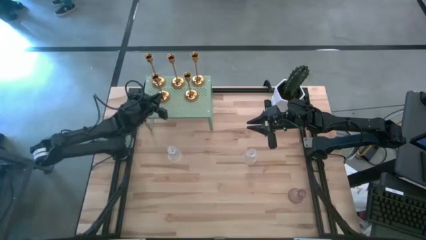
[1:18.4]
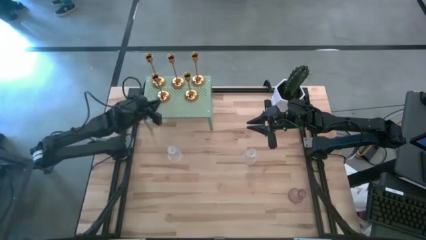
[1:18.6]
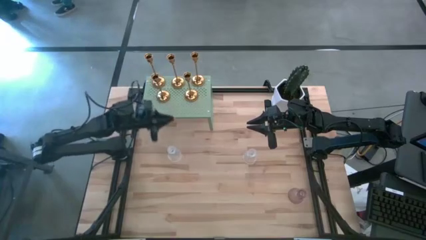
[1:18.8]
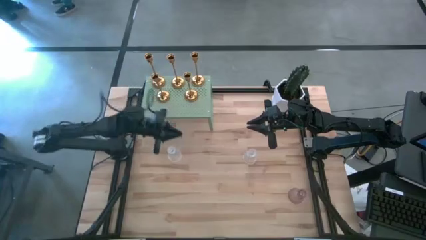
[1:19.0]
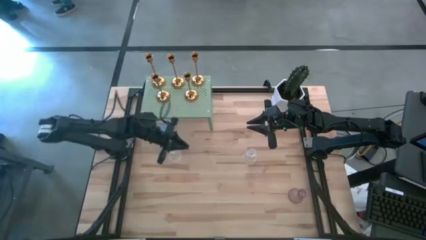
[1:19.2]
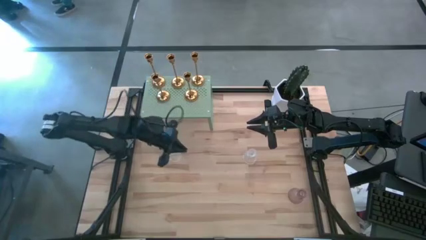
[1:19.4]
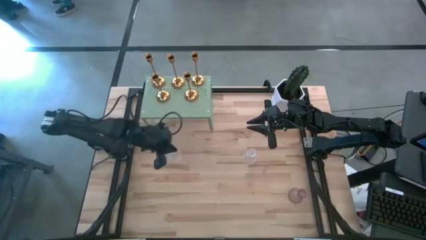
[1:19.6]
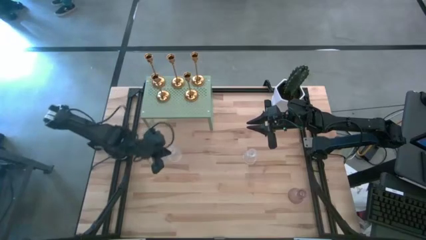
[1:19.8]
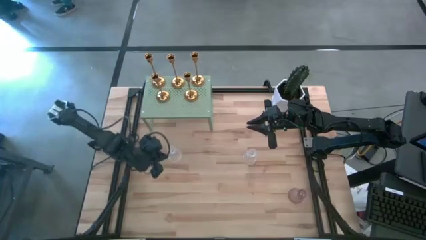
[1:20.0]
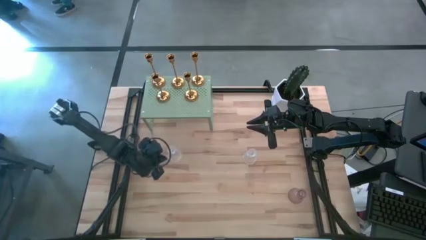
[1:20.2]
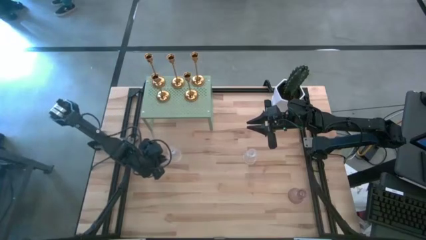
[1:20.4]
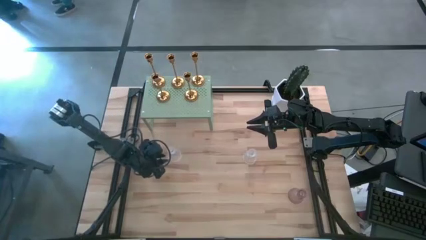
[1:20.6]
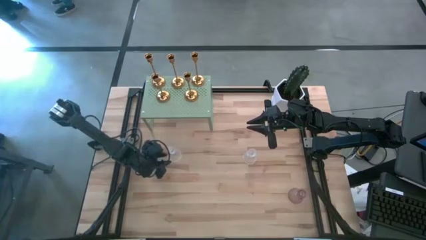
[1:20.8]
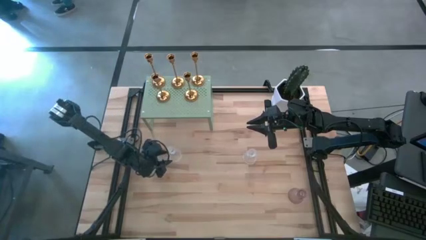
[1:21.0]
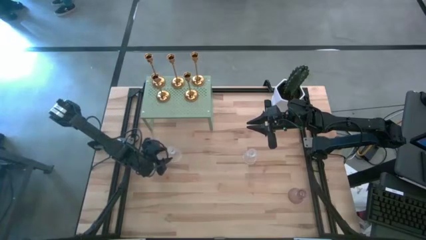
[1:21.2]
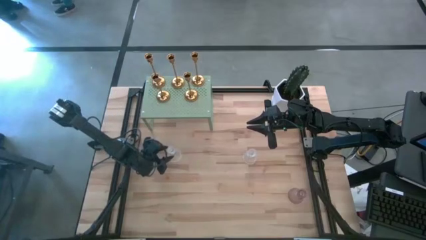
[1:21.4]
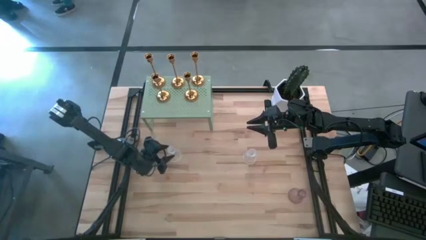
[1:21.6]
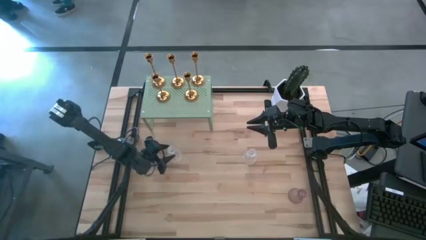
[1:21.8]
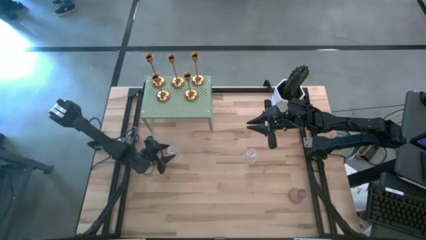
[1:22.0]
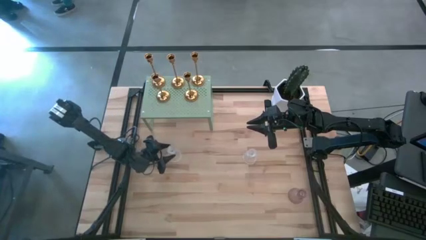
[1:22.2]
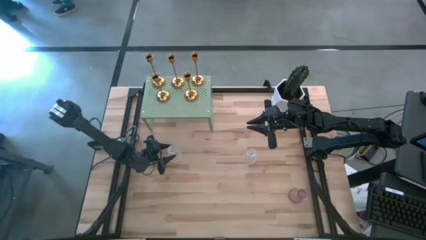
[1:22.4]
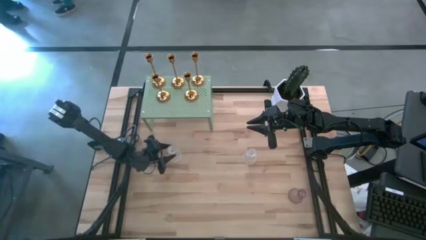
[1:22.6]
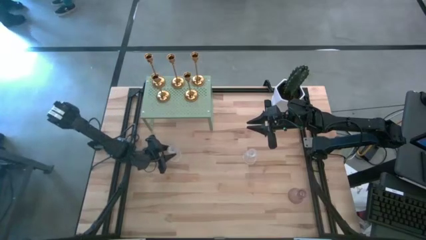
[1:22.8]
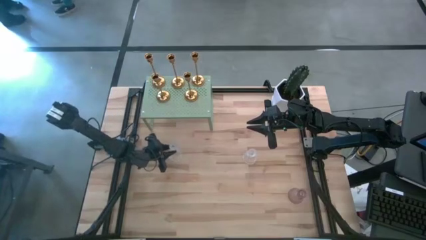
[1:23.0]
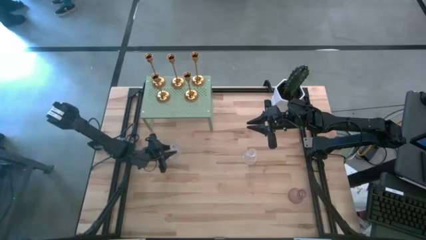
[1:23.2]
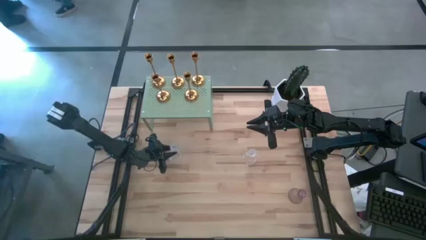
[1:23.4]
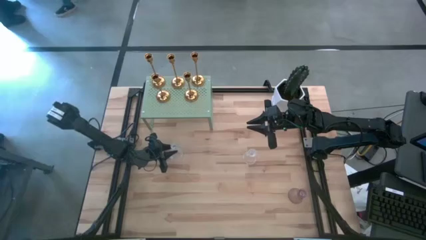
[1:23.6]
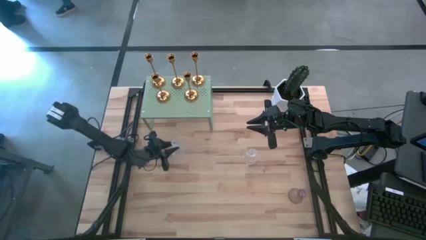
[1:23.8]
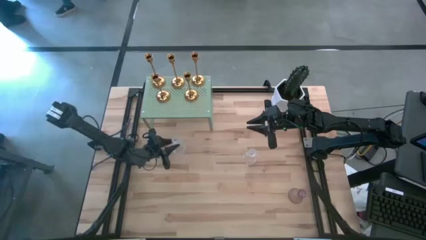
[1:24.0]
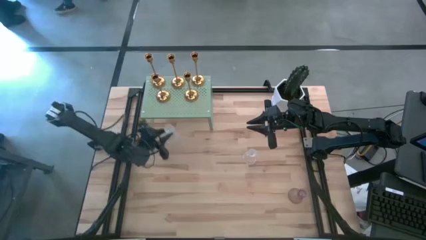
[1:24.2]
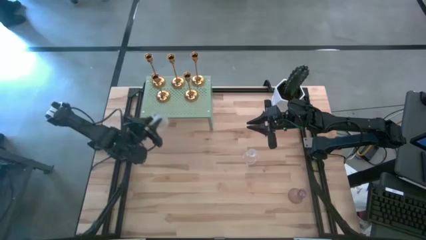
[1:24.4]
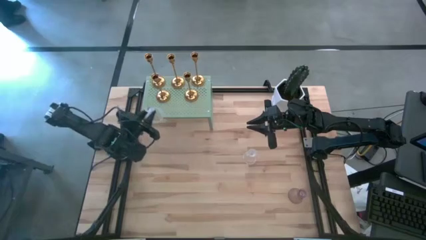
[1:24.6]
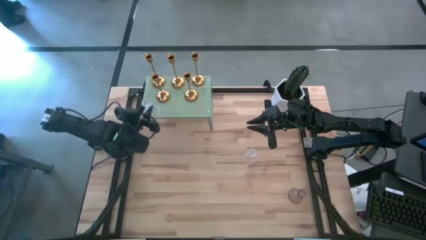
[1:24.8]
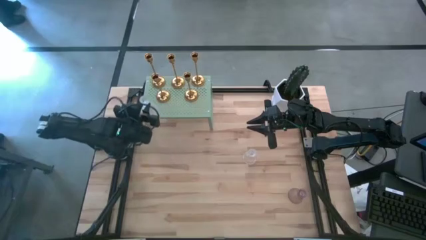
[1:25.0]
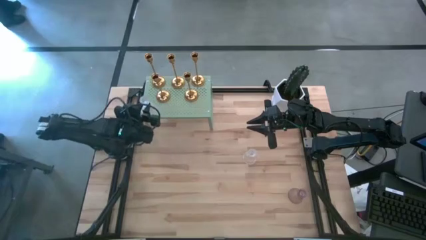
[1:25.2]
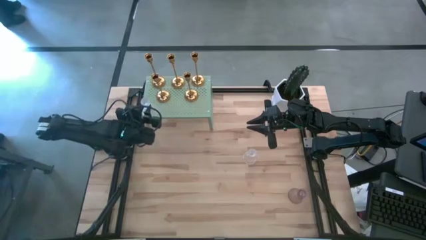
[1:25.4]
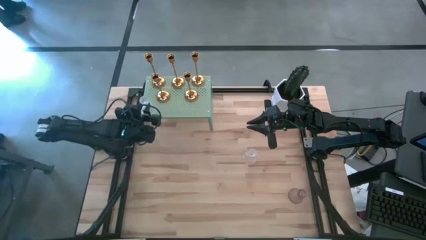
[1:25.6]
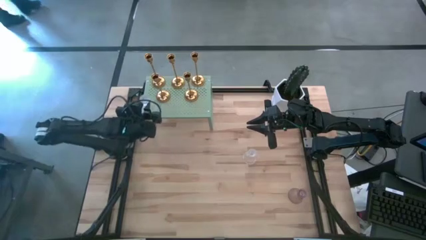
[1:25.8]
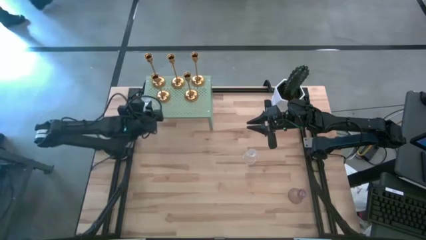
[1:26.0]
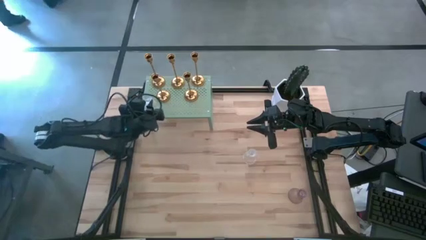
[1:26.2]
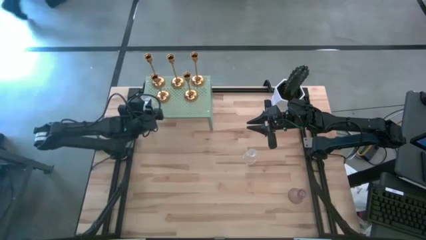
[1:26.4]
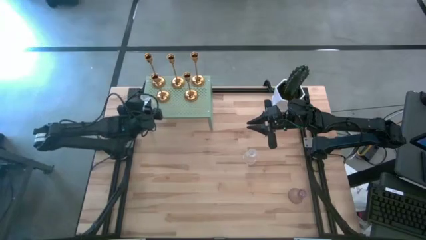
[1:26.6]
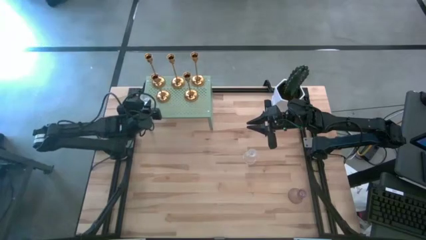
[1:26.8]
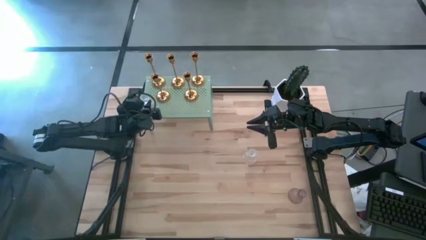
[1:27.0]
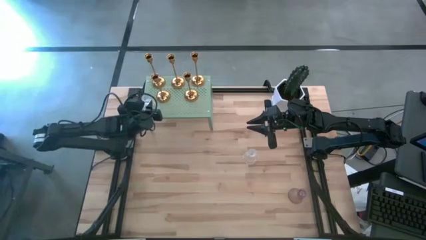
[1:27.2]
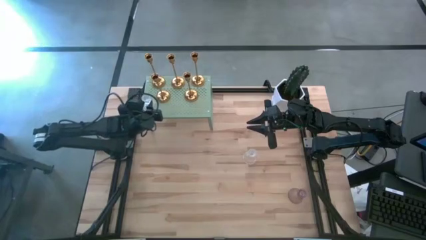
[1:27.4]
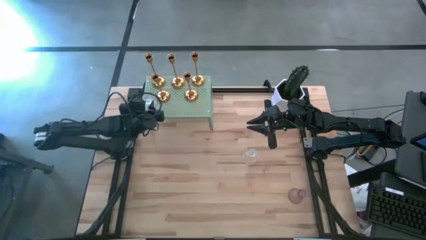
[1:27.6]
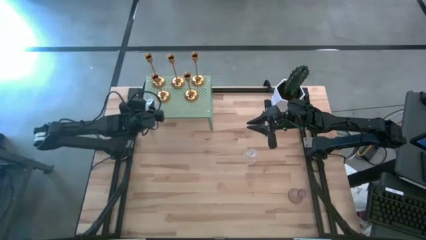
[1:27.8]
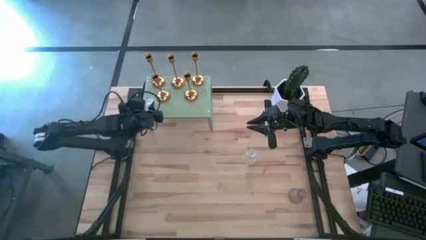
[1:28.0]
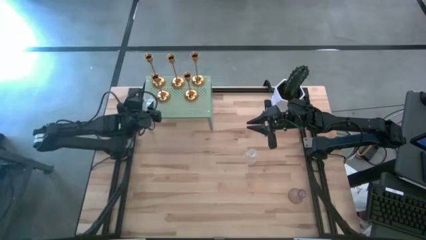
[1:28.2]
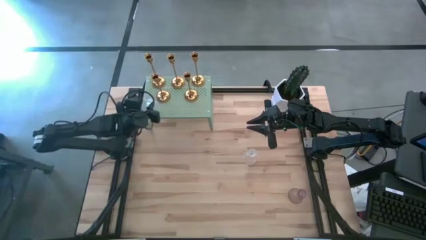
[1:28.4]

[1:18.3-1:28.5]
Task: Pick & Place candle stick holders
Put the left transparent glass candle holder on the shelf

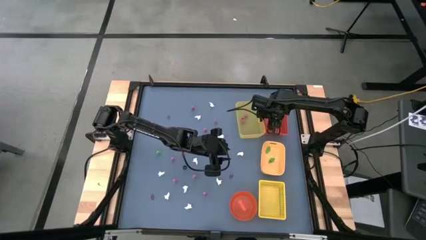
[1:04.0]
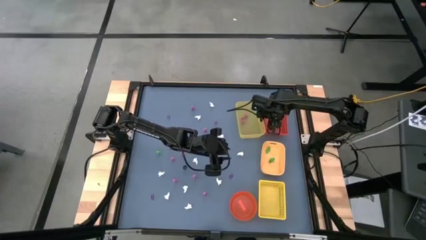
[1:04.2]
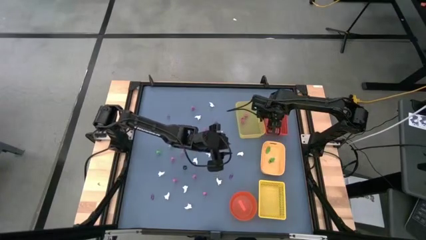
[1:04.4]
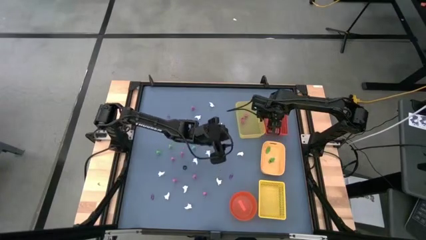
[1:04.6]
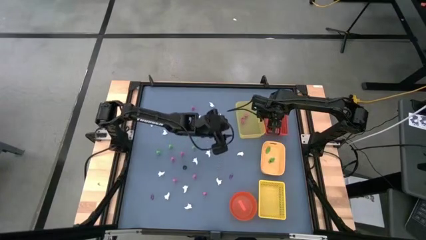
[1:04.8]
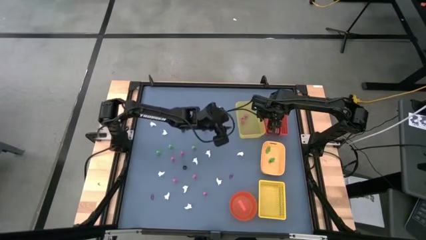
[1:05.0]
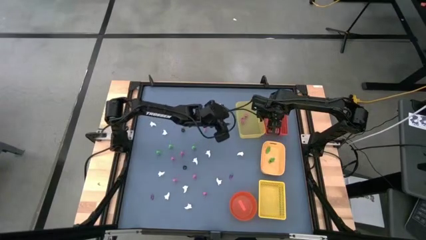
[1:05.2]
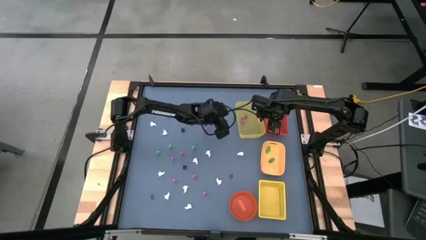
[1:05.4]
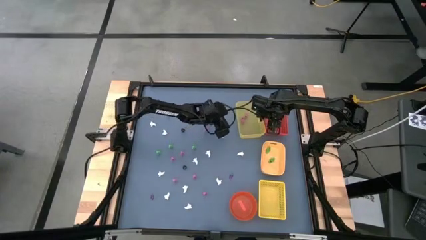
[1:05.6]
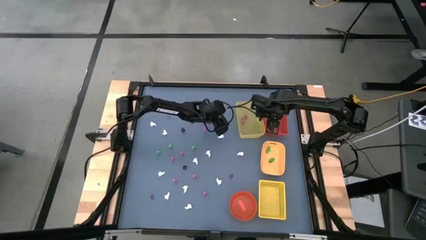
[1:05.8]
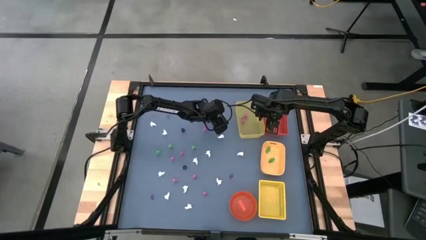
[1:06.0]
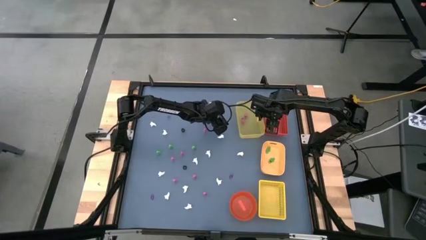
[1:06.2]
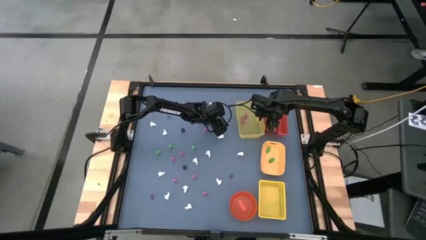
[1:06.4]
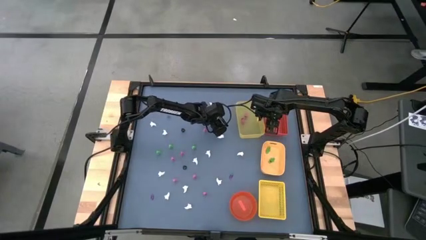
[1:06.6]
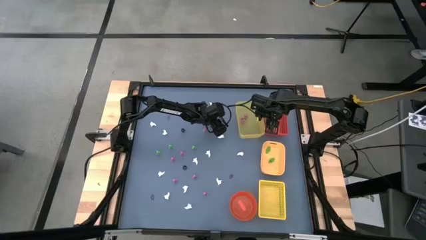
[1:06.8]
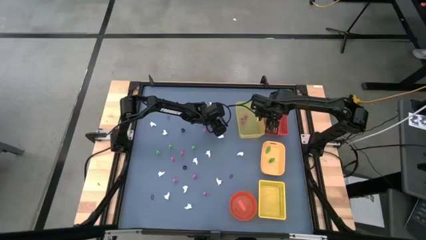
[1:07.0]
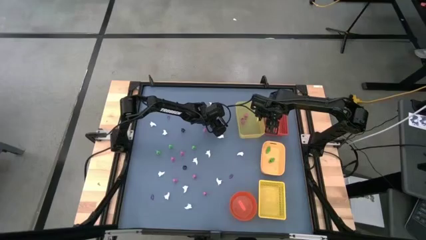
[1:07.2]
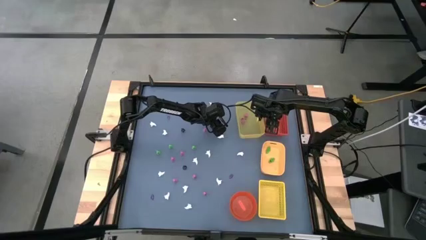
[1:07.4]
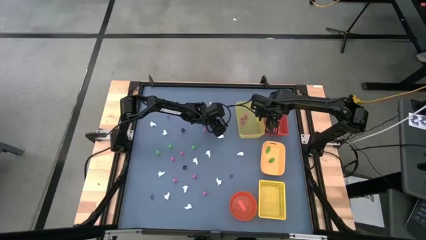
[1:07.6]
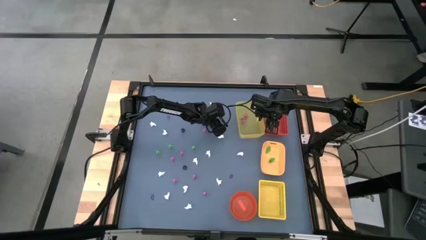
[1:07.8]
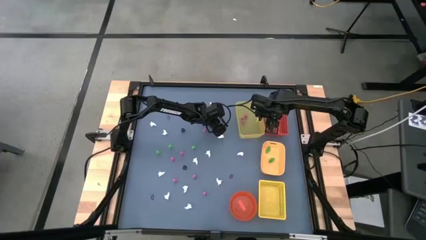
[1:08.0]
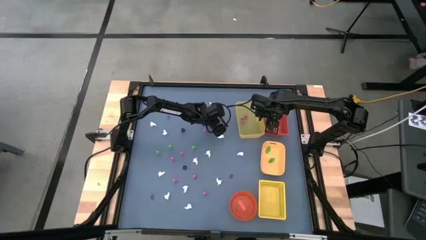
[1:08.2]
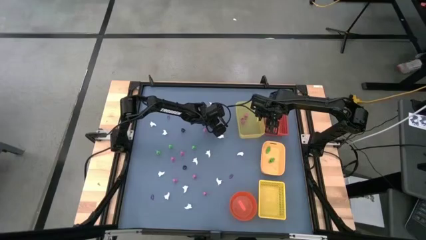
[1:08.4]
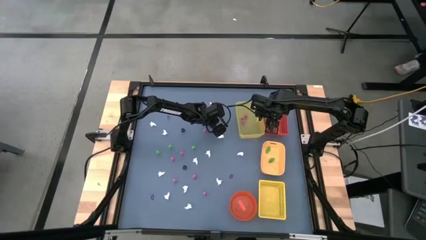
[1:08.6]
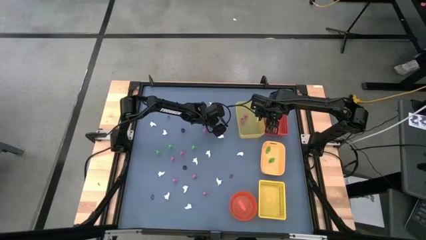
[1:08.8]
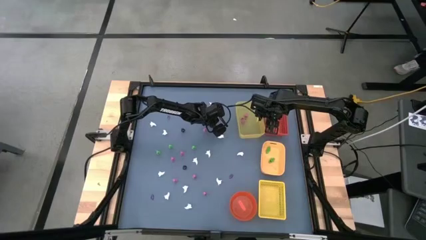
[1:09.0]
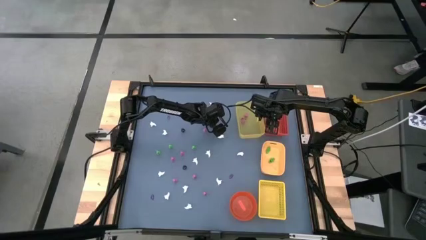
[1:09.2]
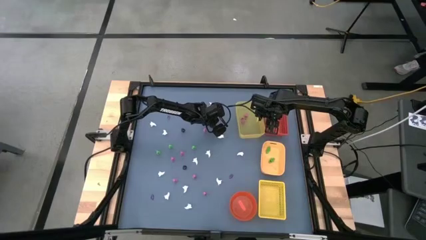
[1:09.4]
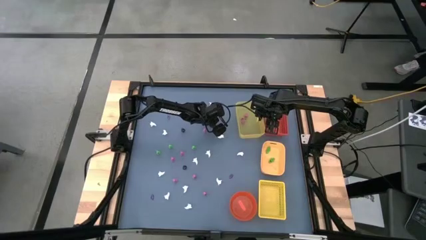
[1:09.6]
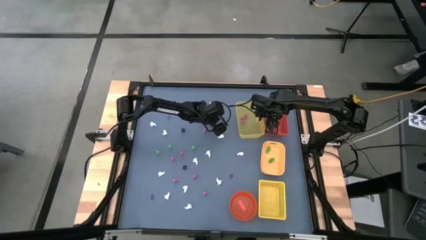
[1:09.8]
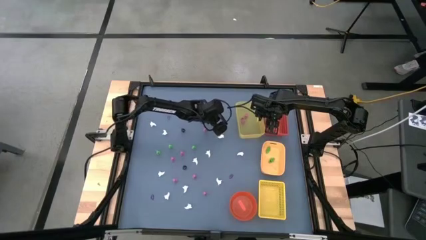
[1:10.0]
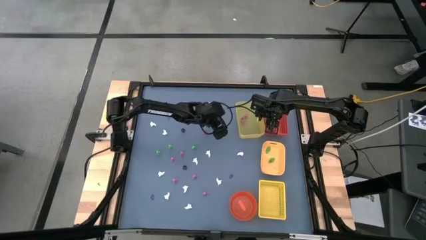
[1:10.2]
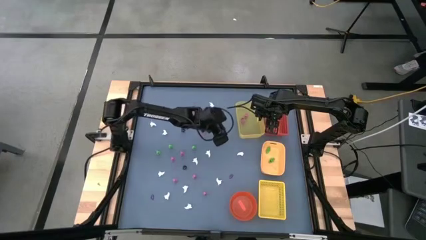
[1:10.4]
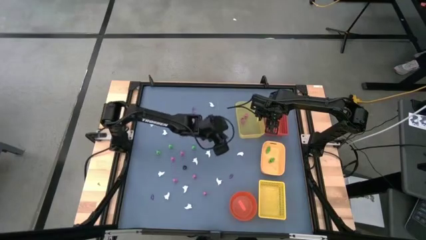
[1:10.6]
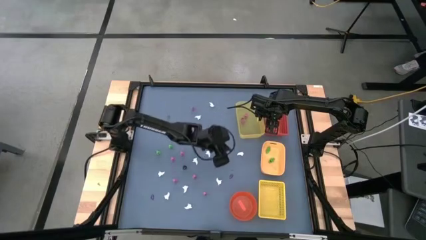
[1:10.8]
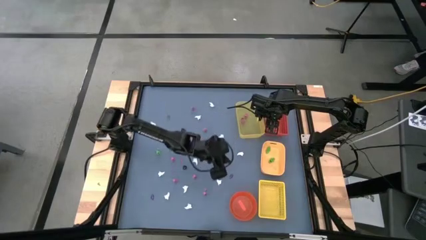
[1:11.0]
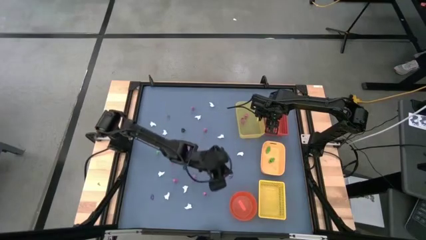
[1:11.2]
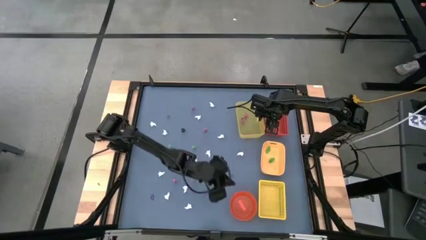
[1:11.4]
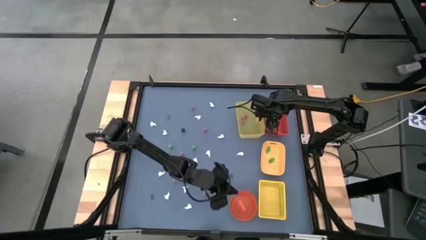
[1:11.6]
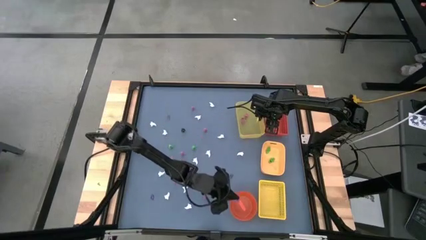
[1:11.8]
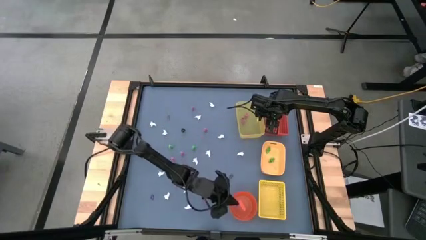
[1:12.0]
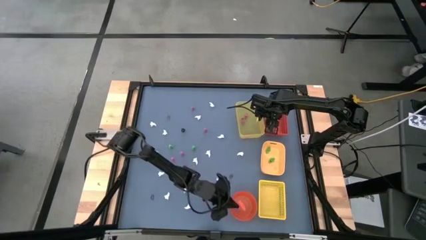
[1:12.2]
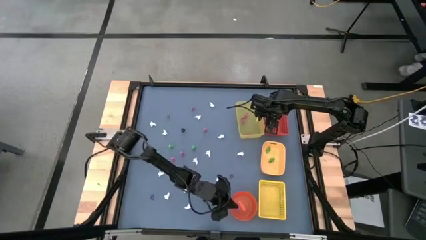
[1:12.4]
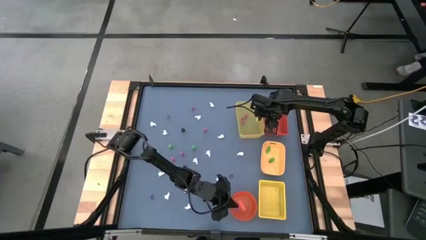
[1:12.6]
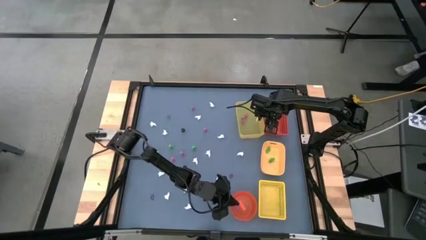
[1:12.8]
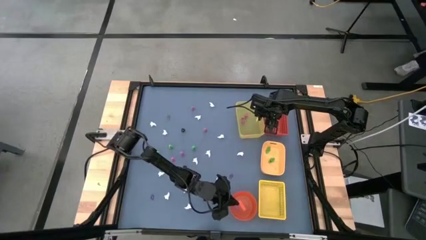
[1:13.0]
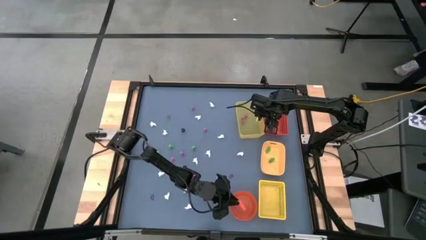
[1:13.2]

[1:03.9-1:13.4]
Task: Sort Halloween decoration
Put the violet witch hat toy into the orange bin
